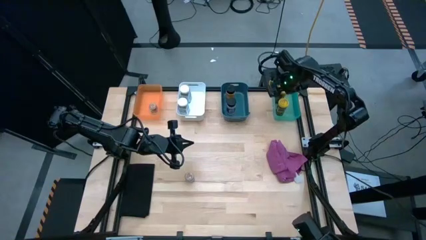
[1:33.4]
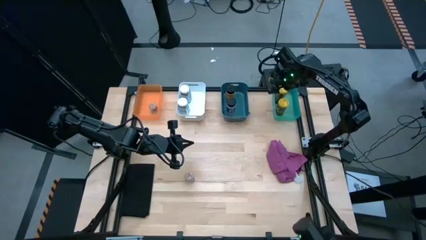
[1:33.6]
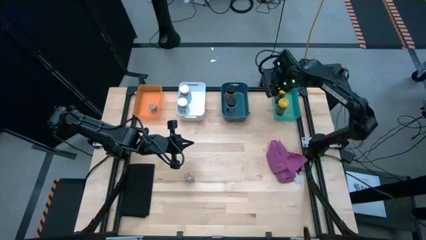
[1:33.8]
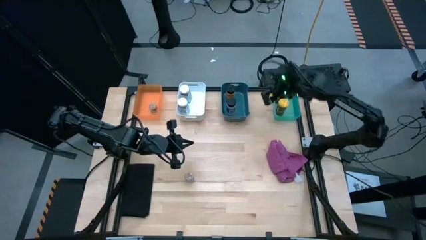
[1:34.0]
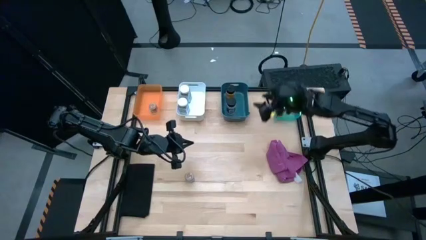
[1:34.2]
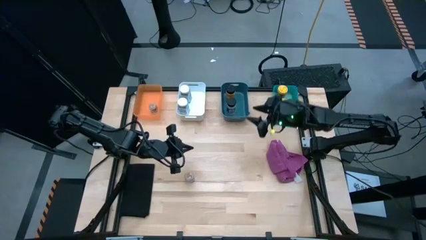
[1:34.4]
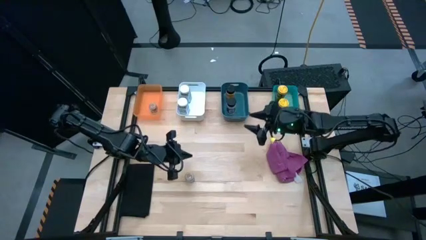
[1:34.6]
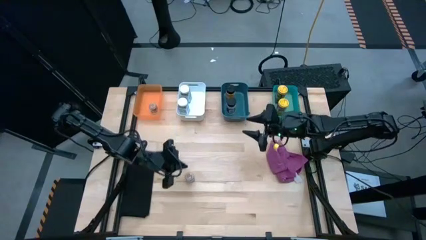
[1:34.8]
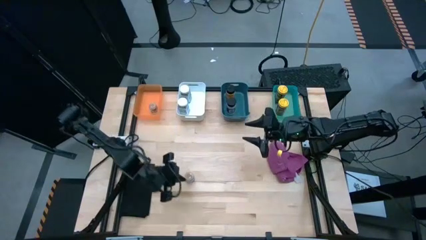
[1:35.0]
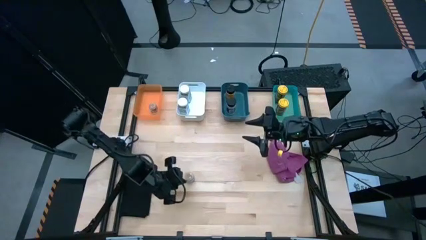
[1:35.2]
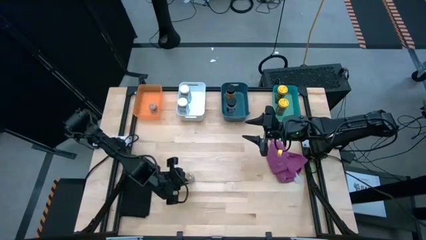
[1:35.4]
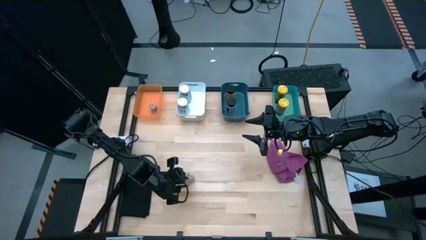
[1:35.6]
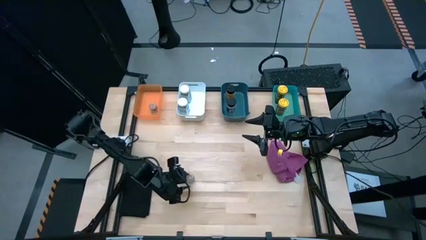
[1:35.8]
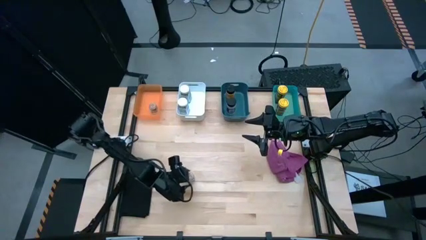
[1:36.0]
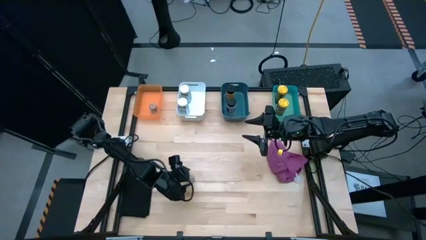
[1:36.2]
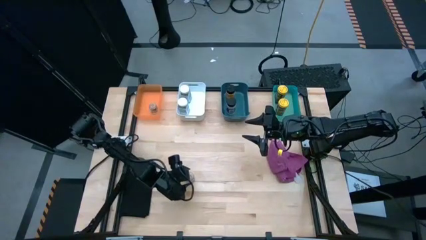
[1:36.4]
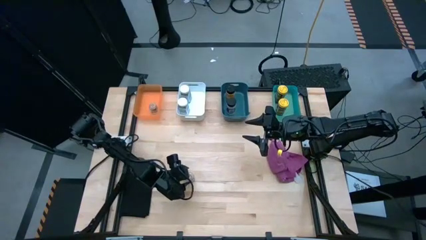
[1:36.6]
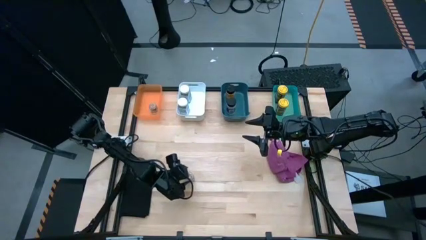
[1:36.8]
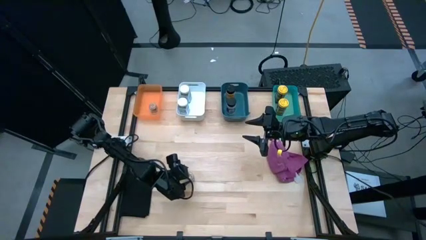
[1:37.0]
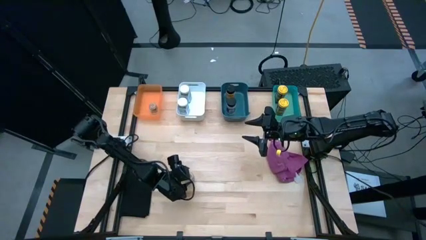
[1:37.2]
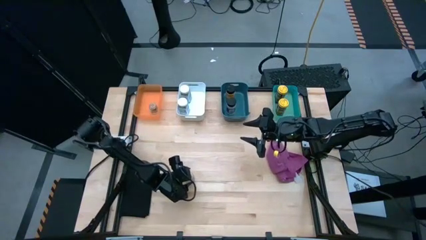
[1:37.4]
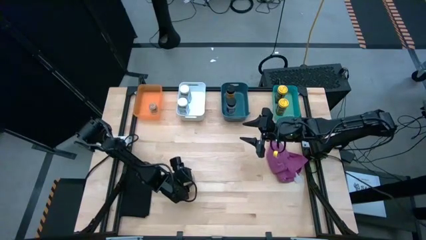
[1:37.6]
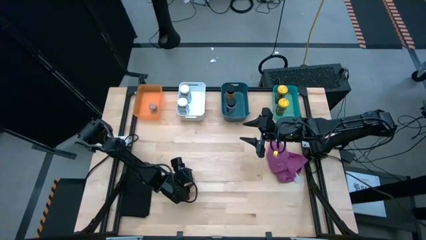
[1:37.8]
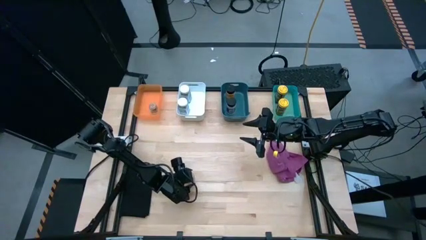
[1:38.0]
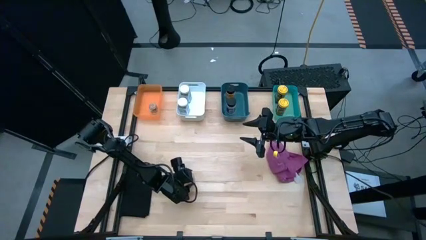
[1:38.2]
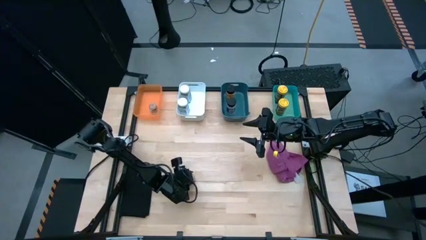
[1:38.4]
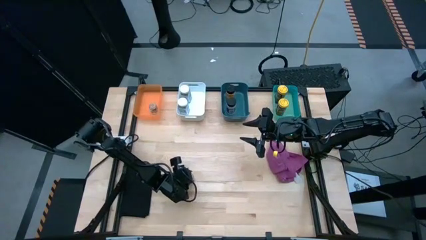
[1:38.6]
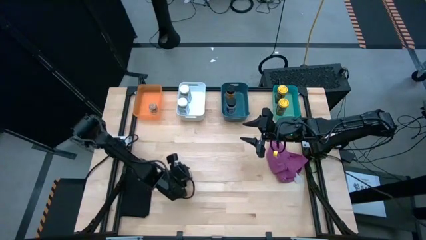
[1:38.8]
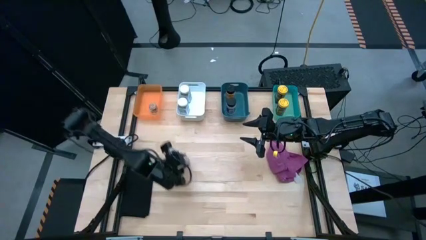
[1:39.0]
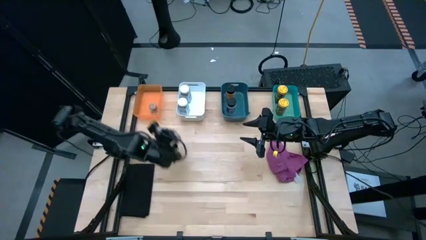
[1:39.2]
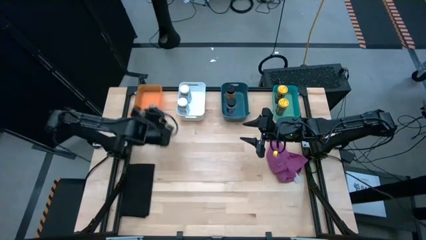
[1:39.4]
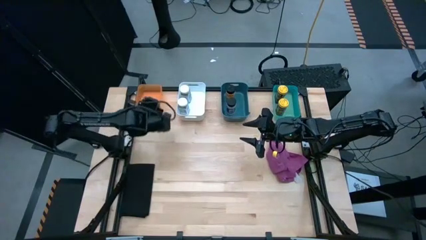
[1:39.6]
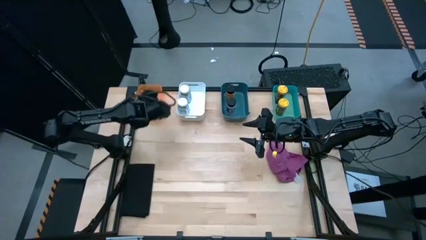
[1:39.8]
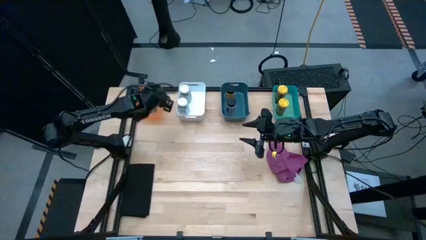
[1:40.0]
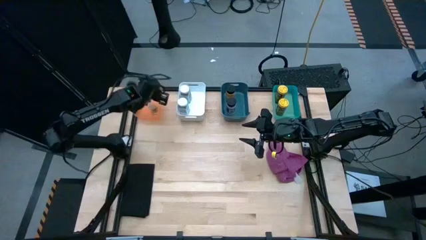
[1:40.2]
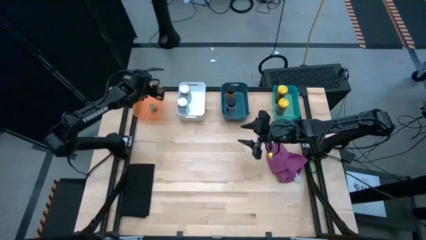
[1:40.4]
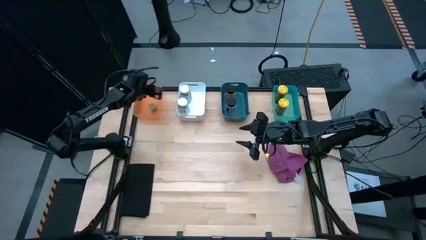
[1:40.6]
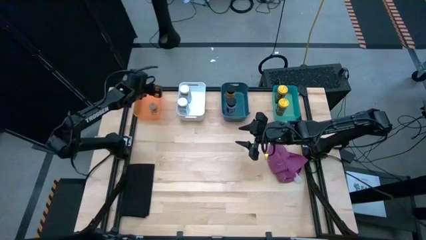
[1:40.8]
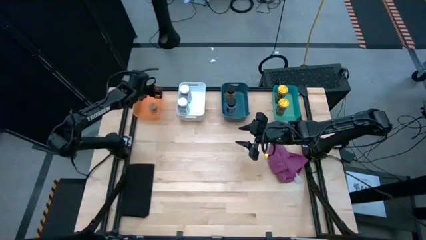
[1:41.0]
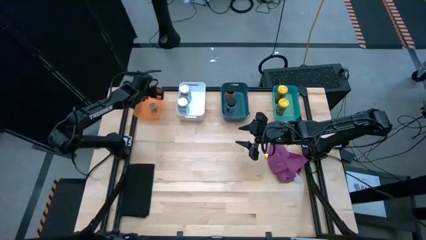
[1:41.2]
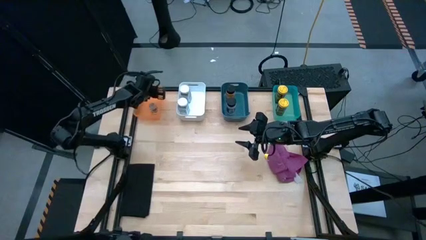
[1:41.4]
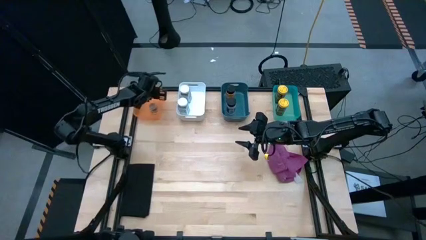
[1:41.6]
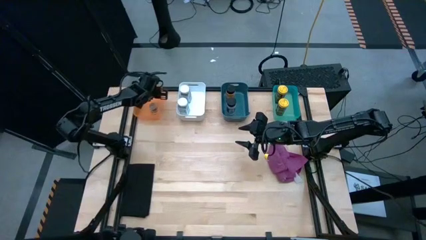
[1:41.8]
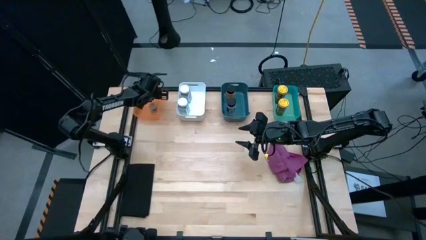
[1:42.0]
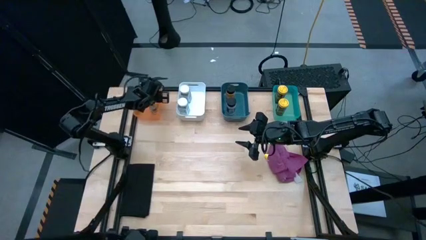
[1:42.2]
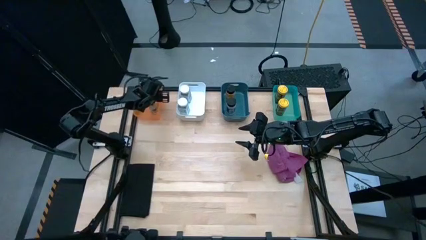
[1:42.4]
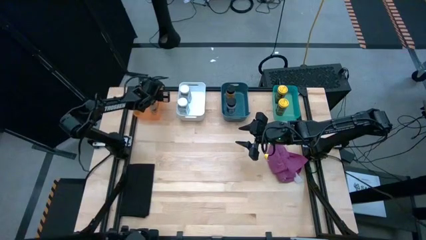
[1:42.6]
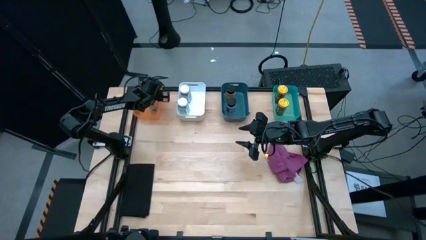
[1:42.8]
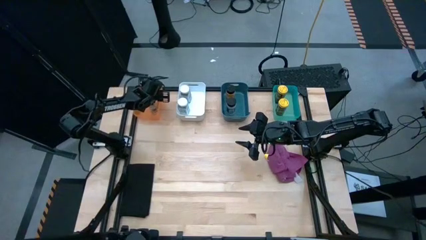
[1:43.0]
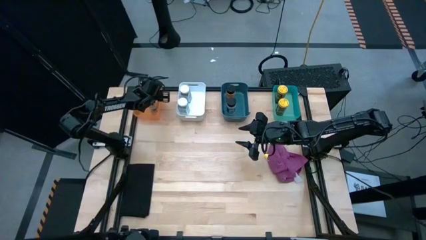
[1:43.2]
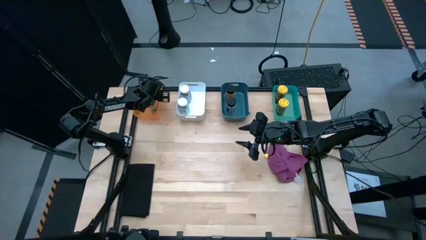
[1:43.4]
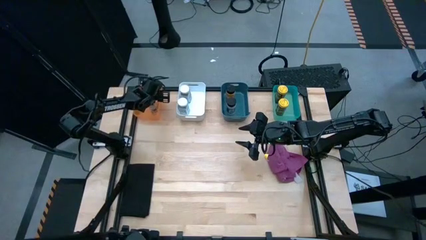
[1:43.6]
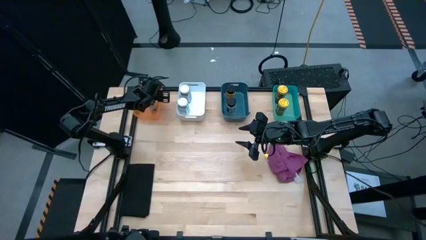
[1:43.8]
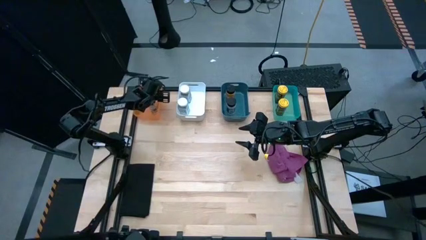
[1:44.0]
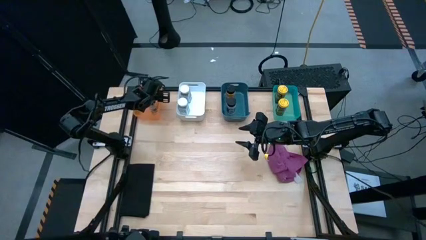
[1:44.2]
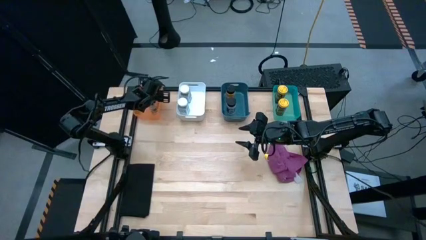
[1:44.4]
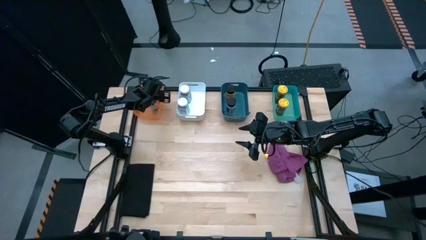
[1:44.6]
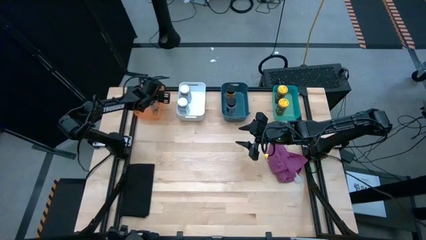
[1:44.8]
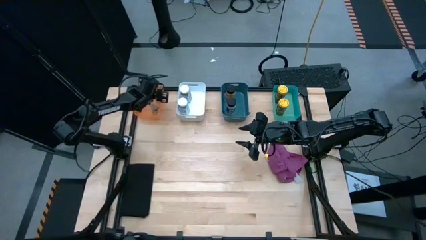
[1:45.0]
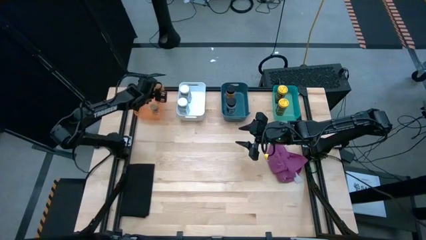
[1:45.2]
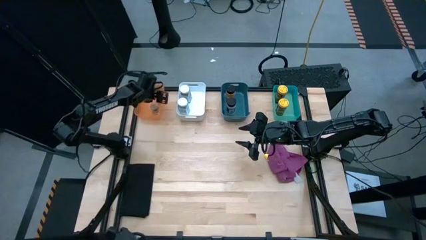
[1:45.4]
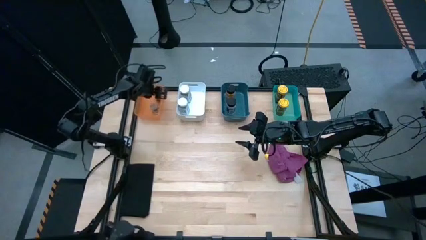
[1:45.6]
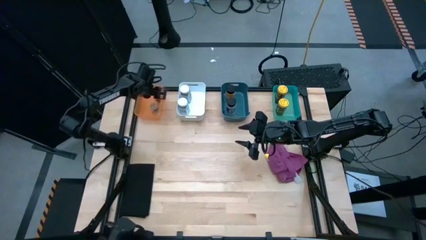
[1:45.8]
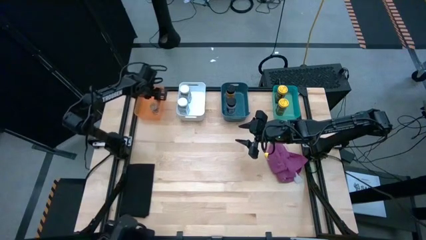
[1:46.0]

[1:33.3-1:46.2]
Task: Sort spices by type
Put the brown seasoning bottle into the orange bin

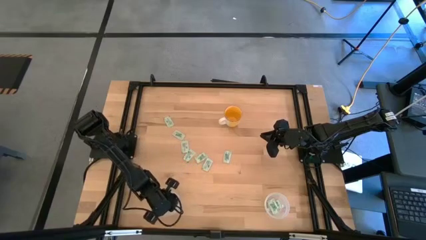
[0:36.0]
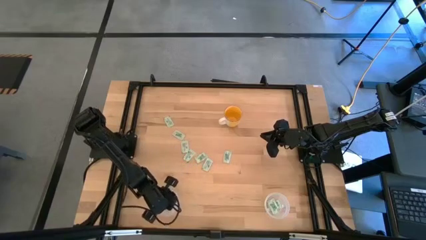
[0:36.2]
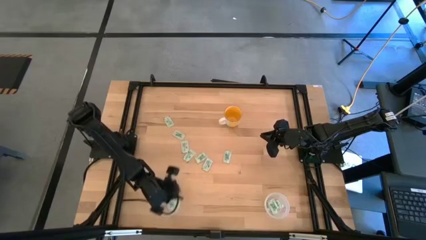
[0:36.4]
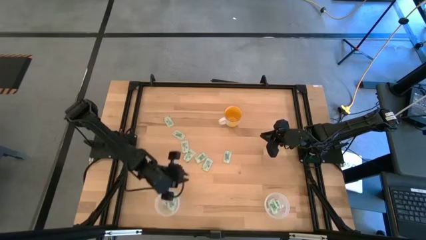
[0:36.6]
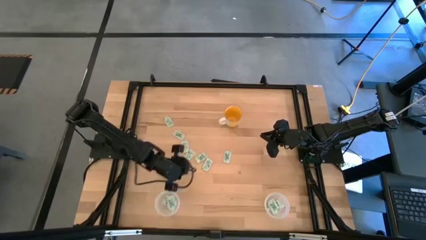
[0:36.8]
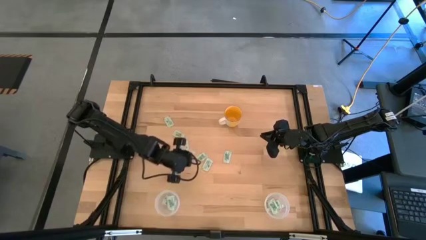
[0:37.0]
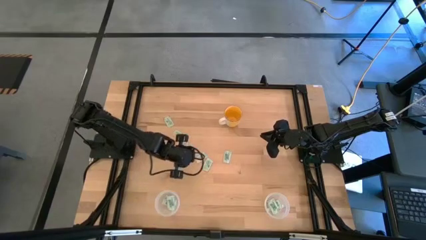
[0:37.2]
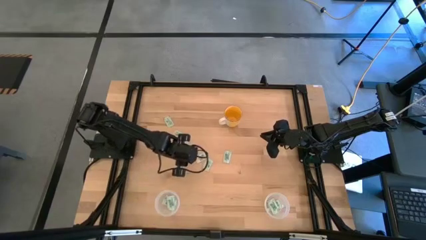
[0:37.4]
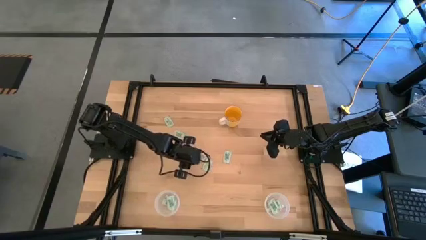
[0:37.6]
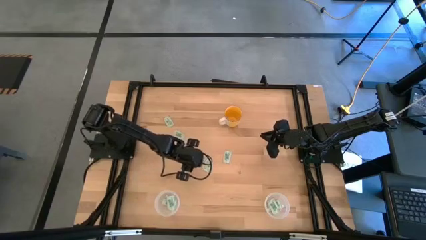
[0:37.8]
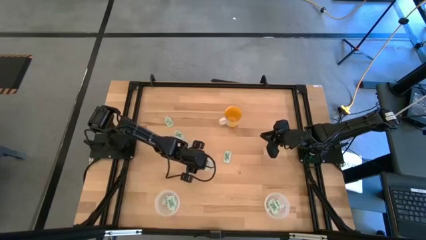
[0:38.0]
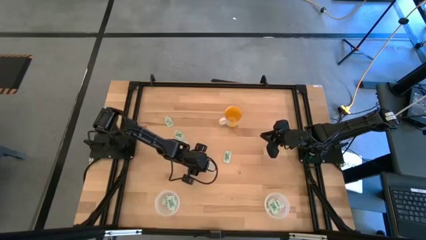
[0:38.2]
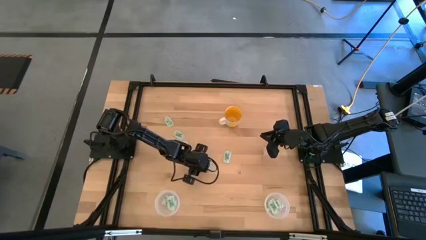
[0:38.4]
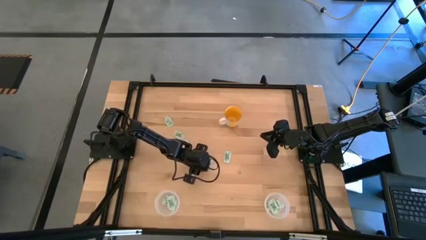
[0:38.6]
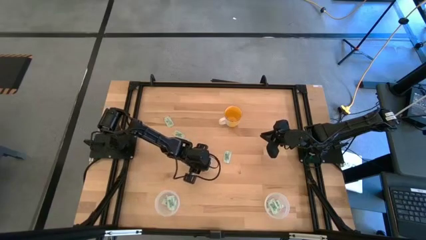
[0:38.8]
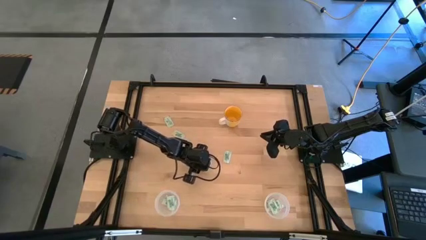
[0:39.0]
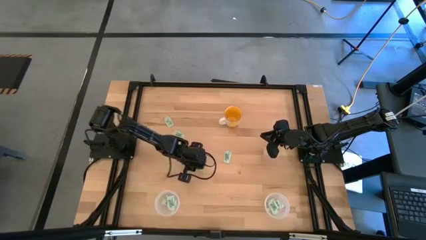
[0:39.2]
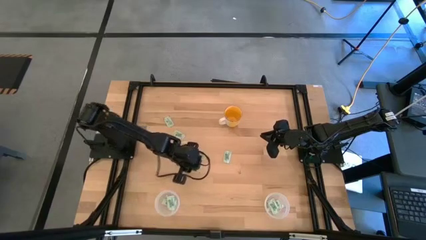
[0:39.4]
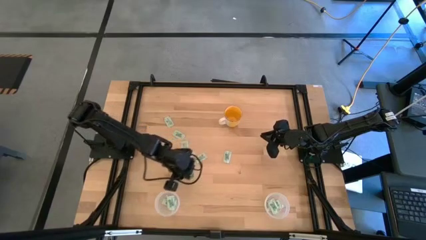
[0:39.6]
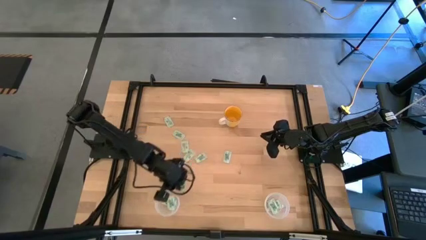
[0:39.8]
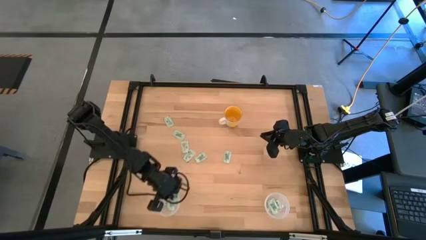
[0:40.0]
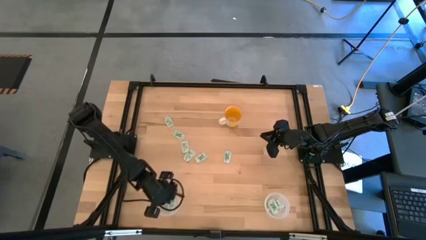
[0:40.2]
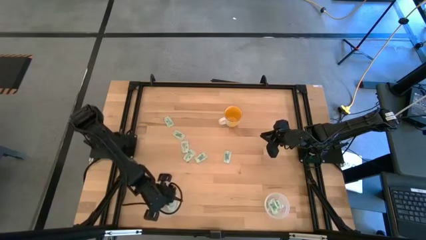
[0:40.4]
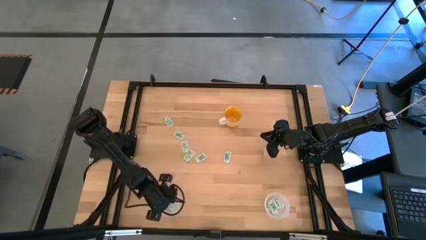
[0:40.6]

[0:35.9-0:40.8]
Task: Pick and place items into bin
Put the stevia packet into the left transparent bin
